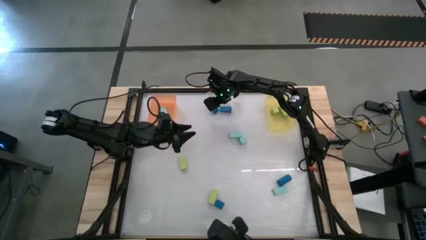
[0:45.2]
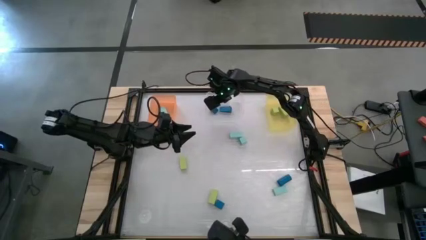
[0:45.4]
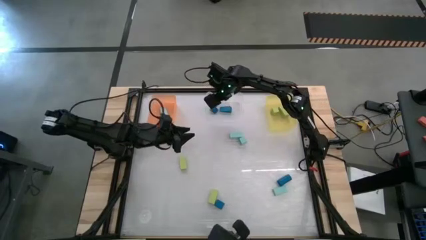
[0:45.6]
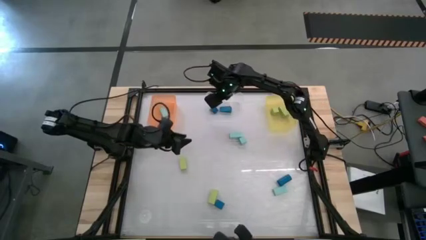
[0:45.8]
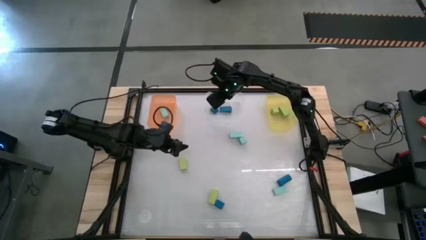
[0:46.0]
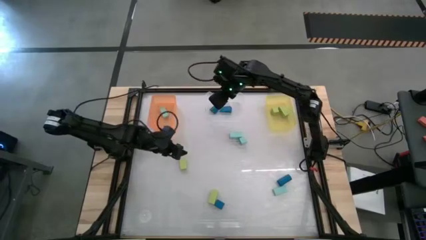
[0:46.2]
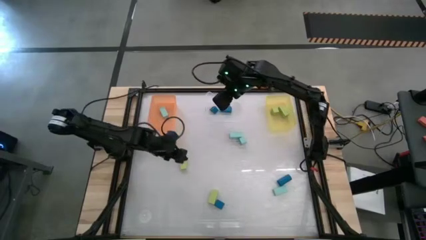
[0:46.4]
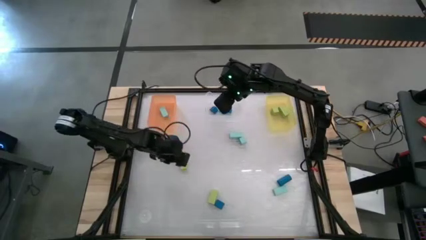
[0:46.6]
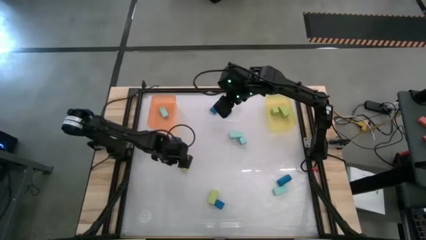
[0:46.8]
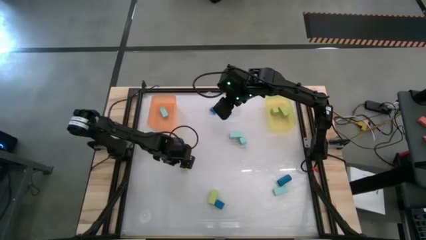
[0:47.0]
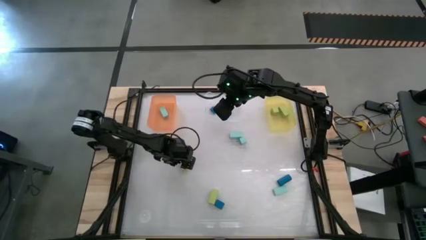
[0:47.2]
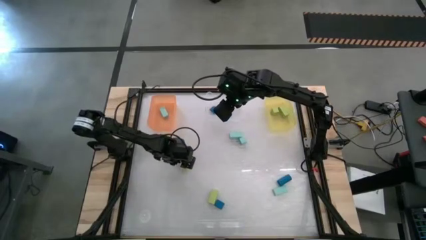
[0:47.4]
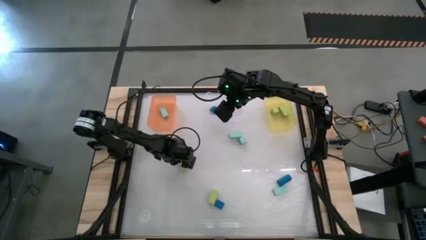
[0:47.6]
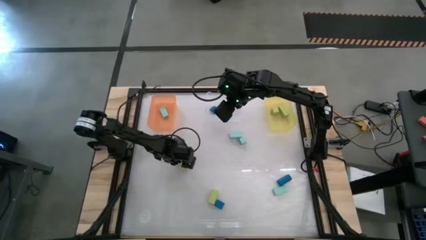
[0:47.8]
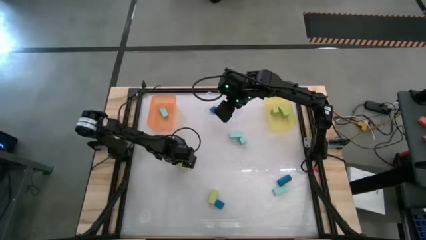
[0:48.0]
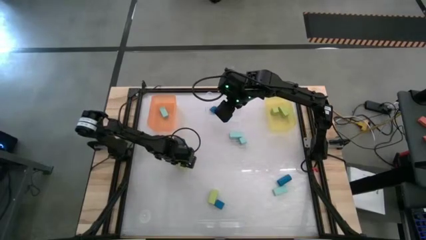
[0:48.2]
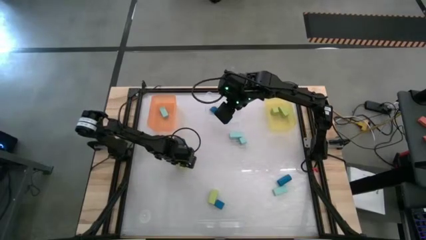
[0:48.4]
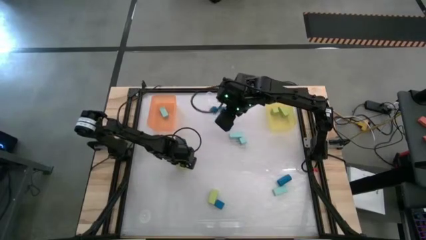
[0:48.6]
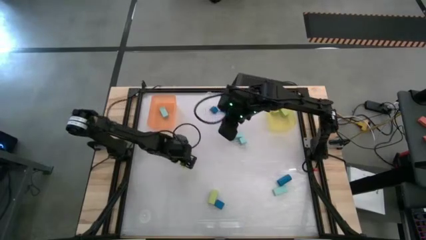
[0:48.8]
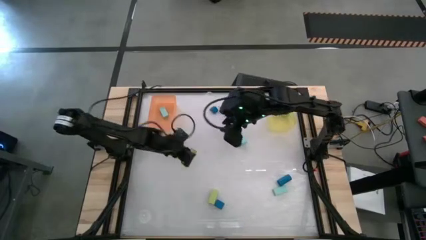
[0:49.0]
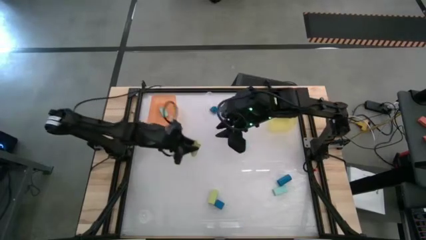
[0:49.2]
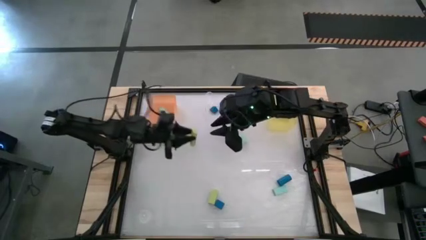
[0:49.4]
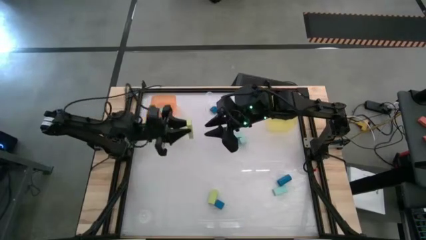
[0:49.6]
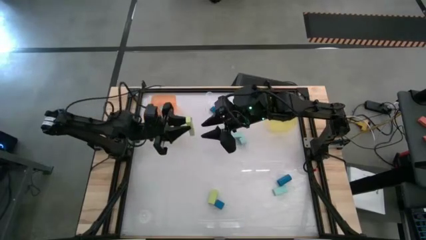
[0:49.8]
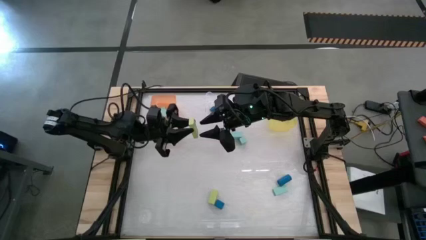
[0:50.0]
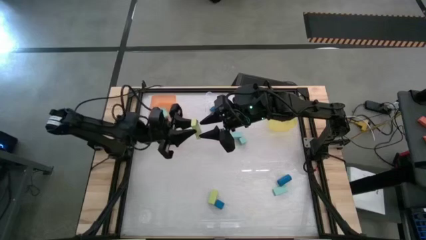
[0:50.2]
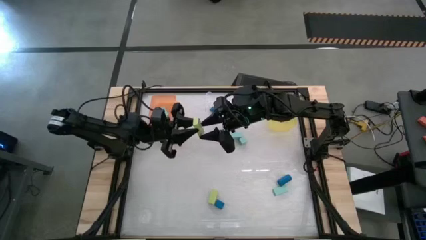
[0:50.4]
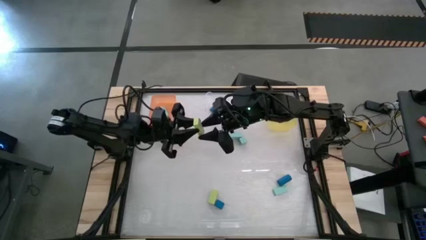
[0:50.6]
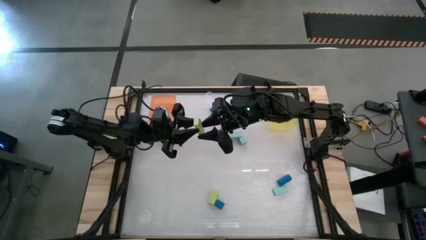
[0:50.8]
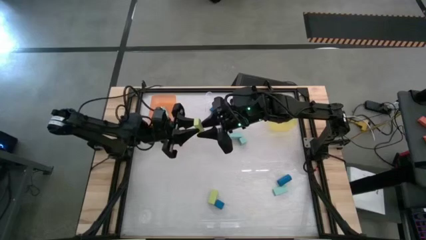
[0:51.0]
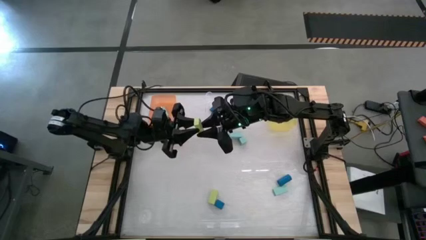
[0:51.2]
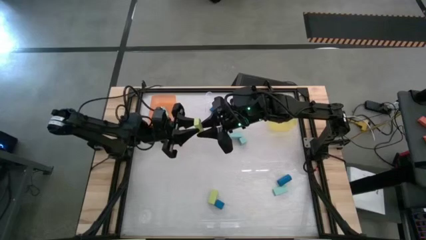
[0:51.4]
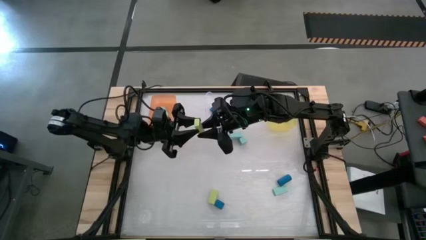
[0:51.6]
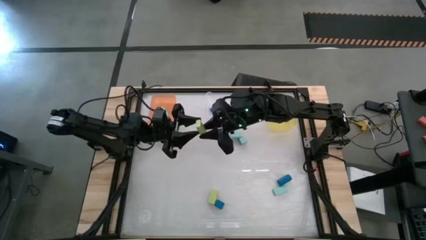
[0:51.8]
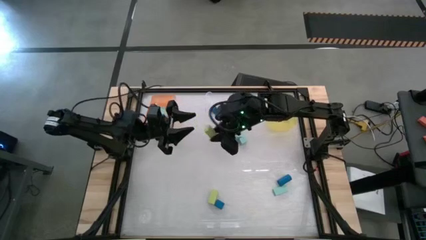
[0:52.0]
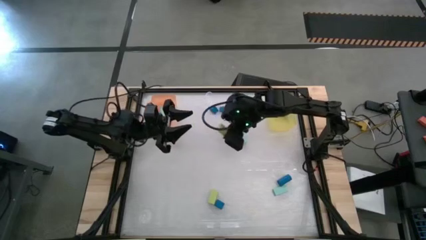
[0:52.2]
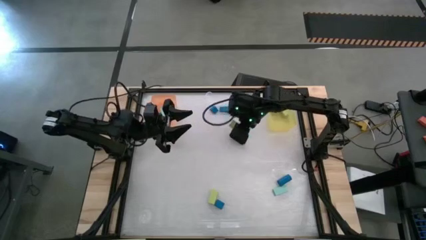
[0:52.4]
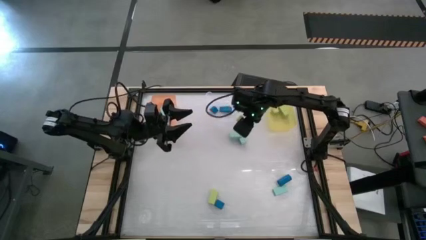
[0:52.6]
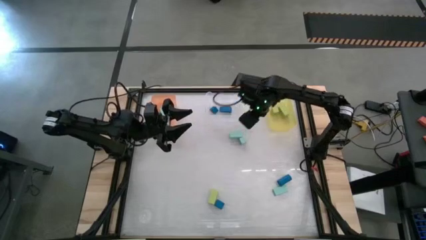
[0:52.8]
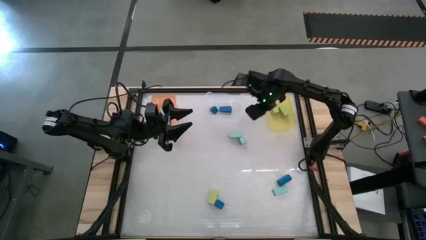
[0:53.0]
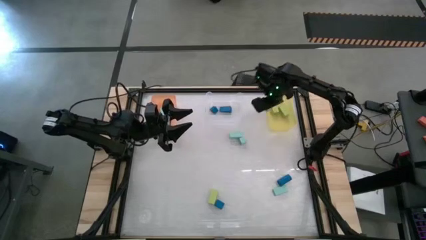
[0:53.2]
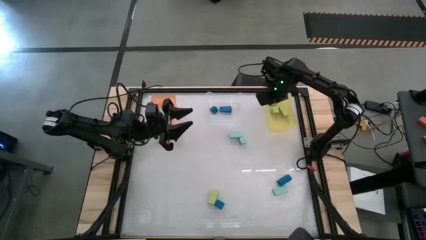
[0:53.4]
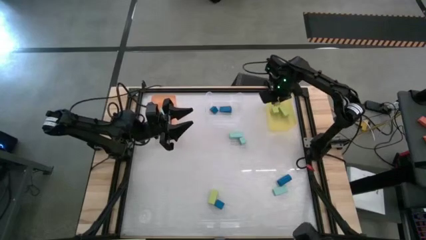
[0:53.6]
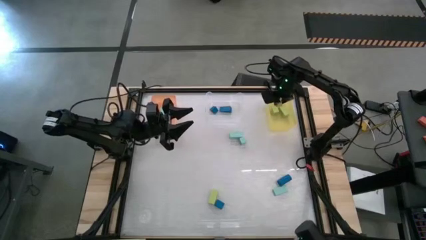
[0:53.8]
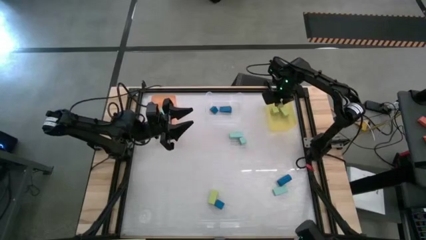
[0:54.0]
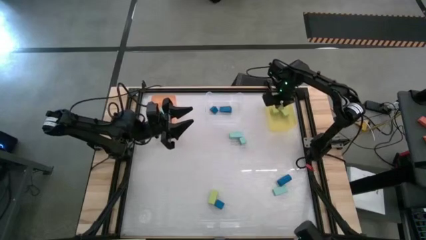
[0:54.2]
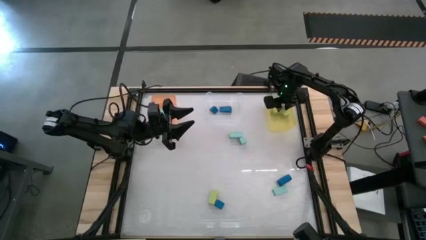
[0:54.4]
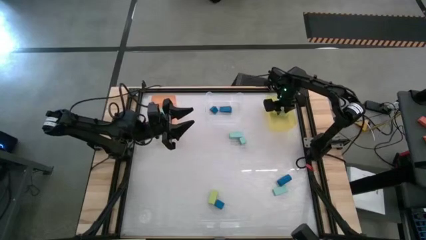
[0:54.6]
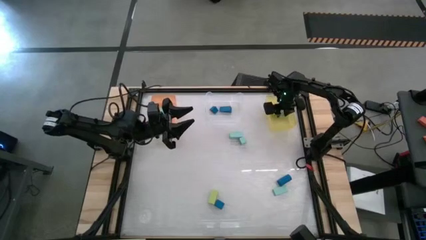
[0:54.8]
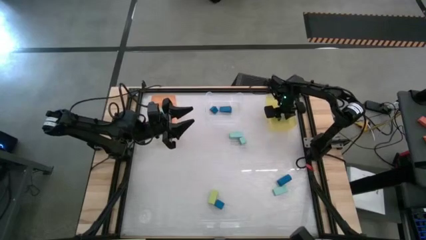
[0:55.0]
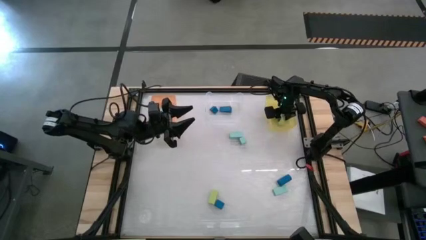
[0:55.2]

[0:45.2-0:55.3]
Task: Sort & place blocks by color
Put the top green rectangle block into the yellow bin

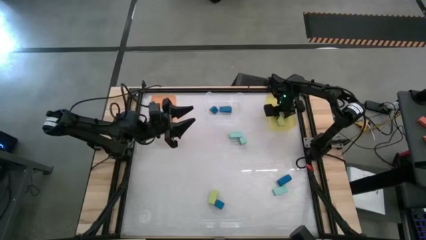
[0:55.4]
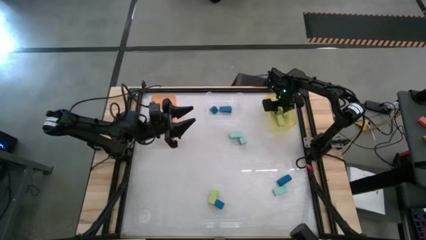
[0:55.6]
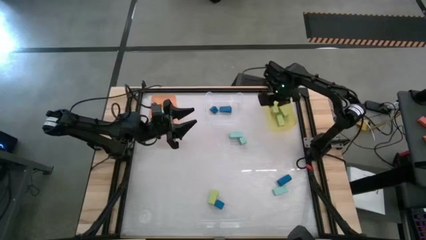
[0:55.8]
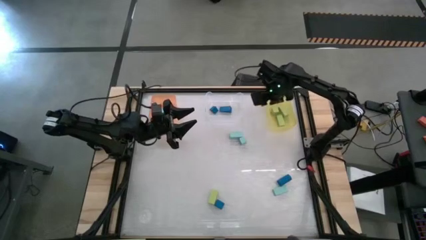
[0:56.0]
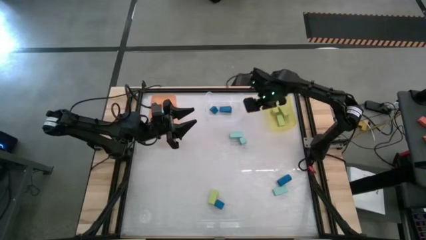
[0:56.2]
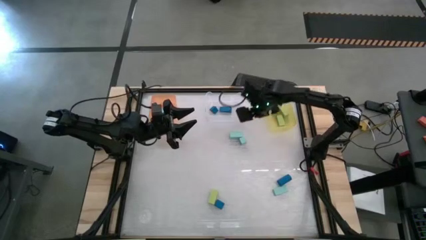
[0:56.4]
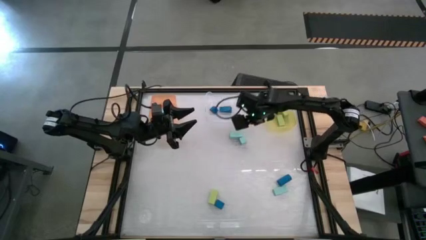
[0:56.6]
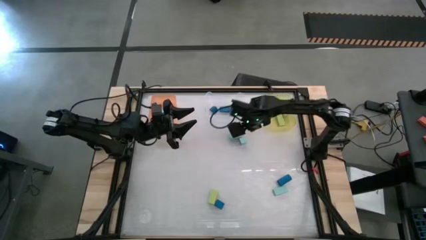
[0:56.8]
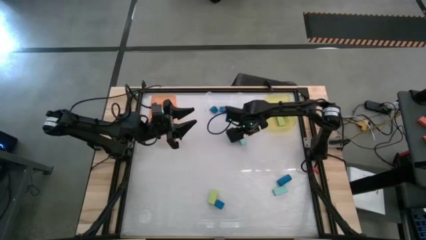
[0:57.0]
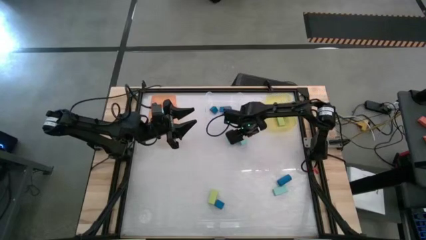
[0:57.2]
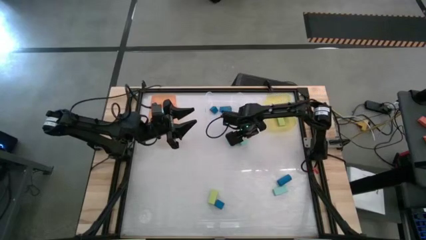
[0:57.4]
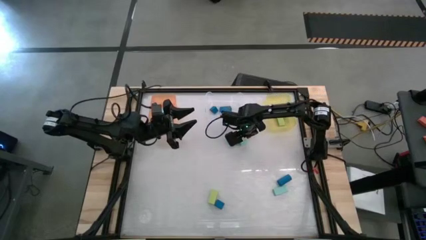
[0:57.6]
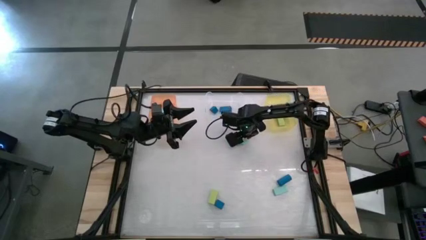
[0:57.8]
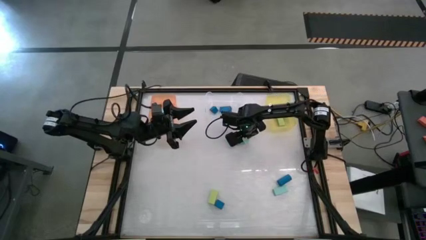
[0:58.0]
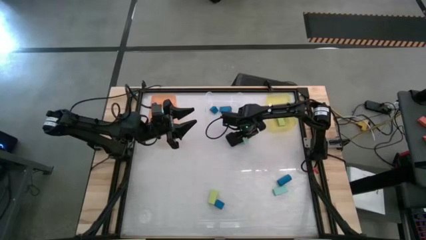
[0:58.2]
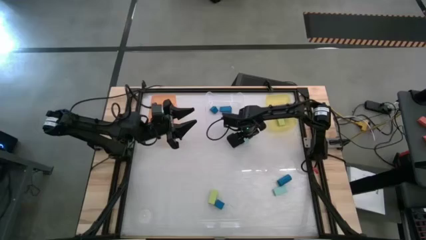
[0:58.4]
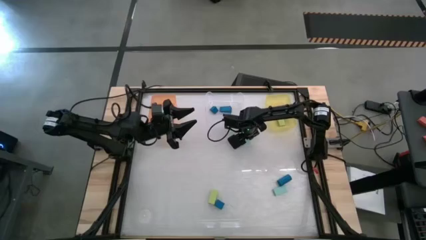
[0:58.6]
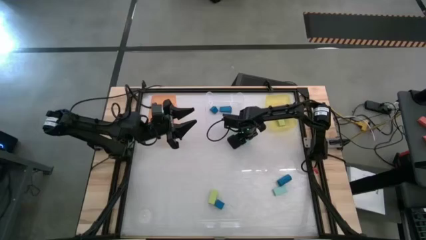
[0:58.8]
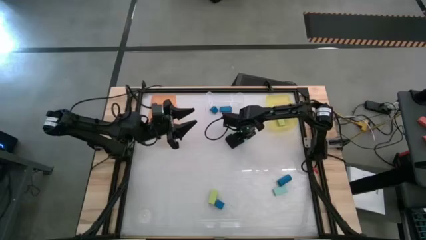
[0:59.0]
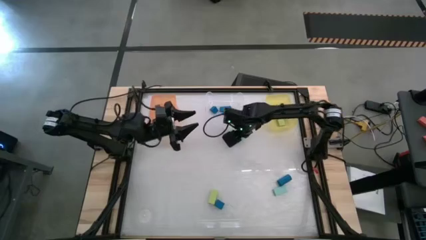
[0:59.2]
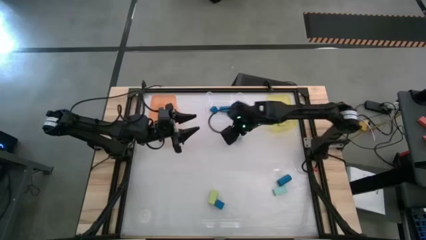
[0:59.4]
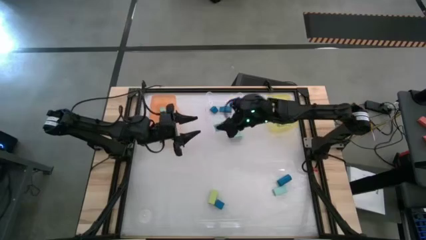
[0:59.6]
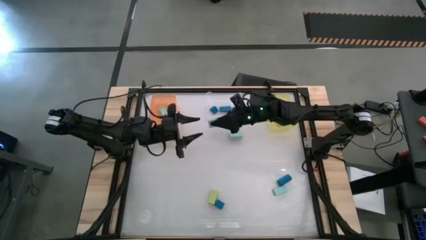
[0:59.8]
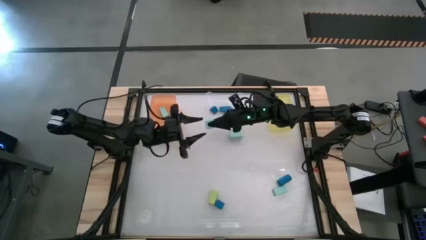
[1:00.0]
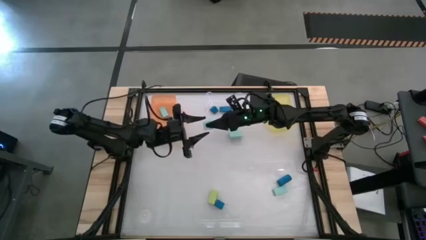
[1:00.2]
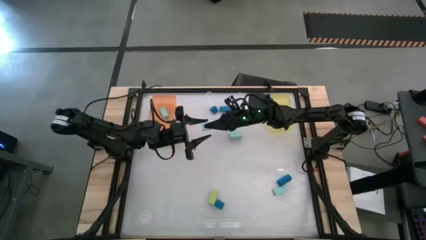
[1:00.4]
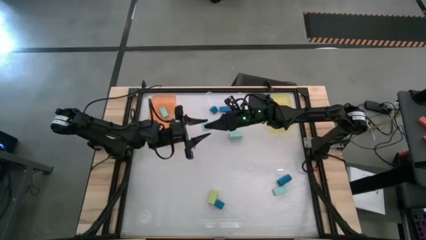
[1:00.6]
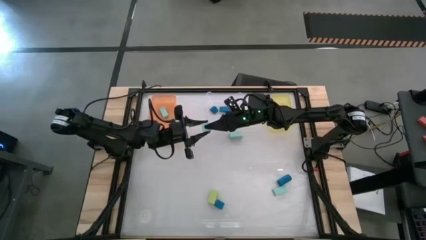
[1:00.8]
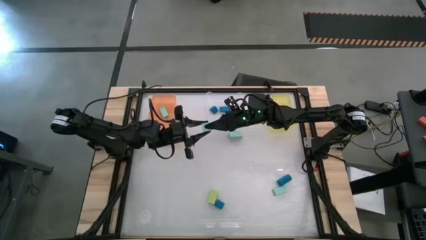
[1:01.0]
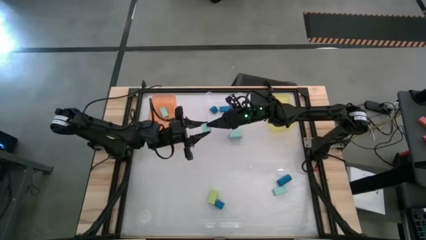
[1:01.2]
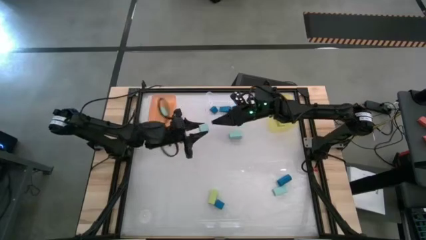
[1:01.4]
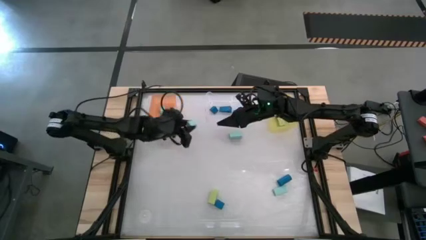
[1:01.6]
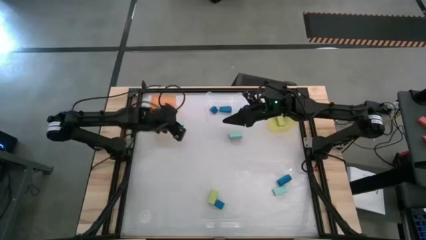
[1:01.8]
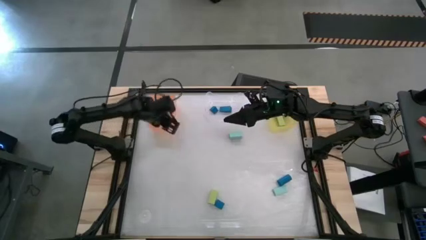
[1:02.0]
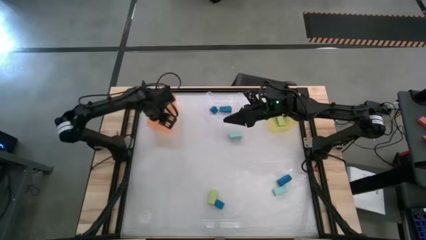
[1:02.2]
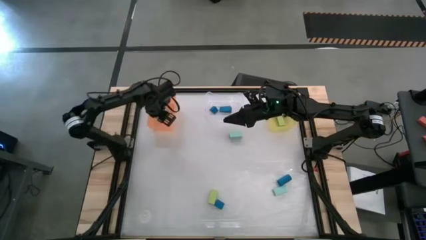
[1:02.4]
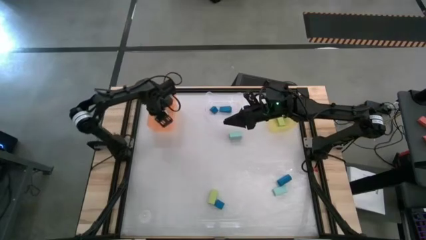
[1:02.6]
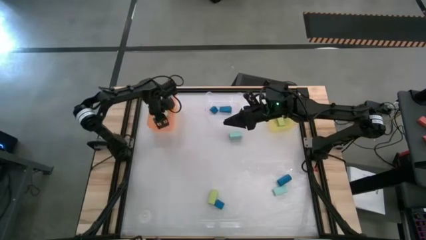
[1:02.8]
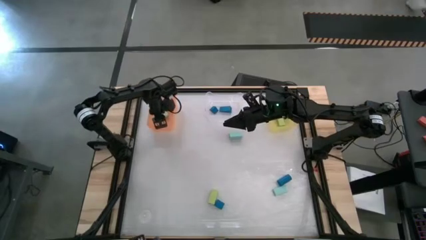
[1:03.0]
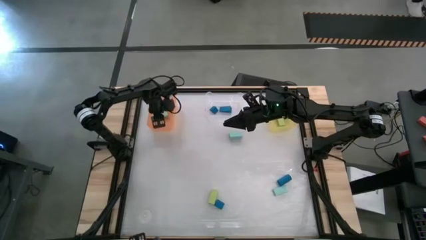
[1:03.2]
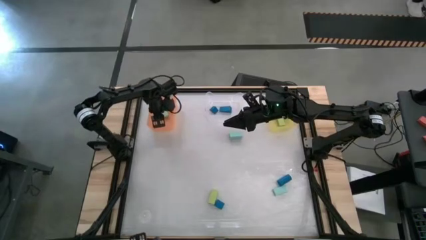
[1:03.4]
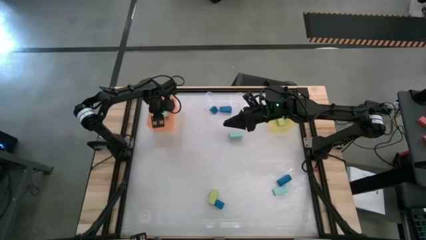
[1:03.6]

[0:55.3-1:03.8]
Put the light blue square block into the orange bin
